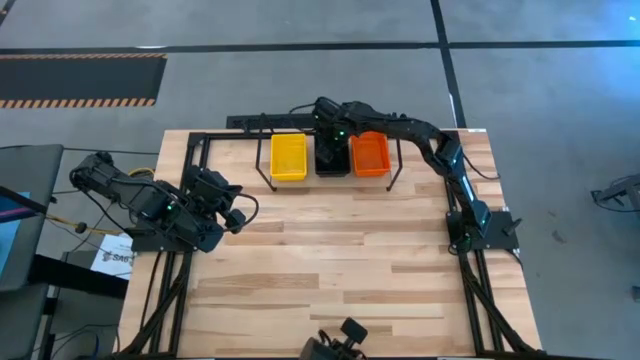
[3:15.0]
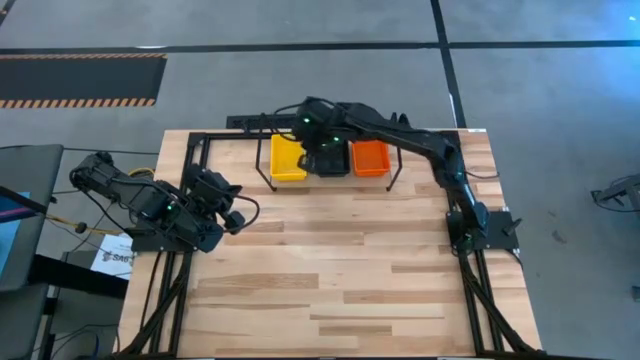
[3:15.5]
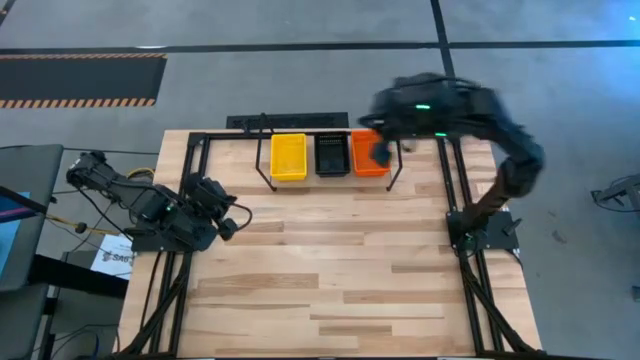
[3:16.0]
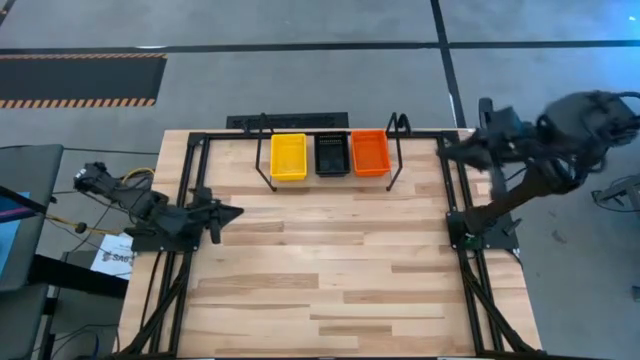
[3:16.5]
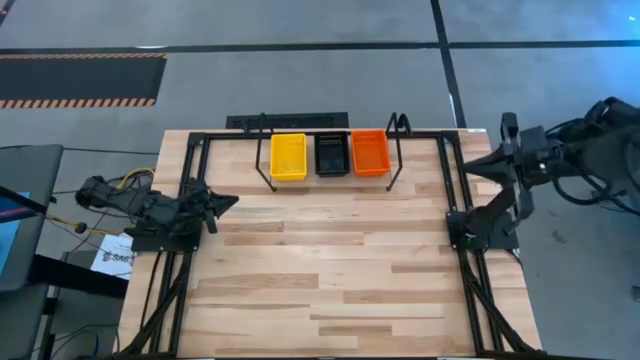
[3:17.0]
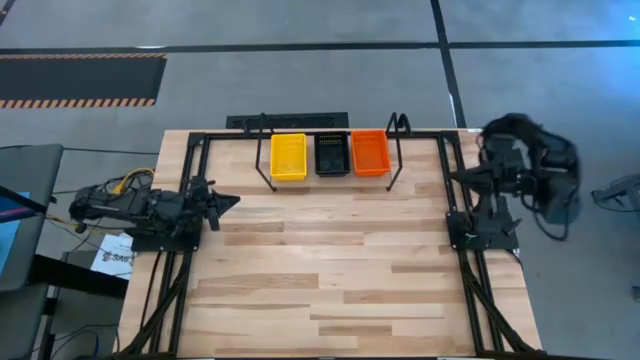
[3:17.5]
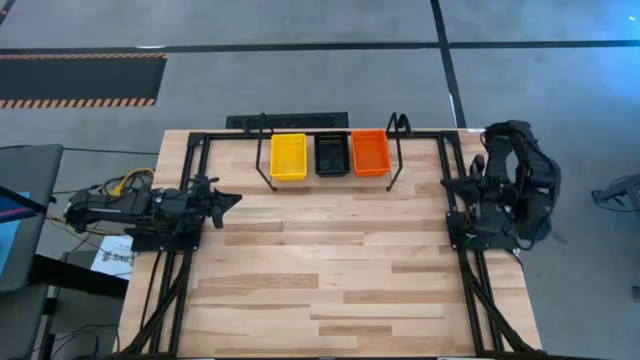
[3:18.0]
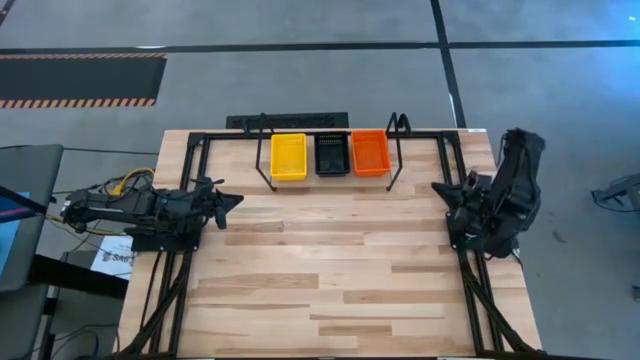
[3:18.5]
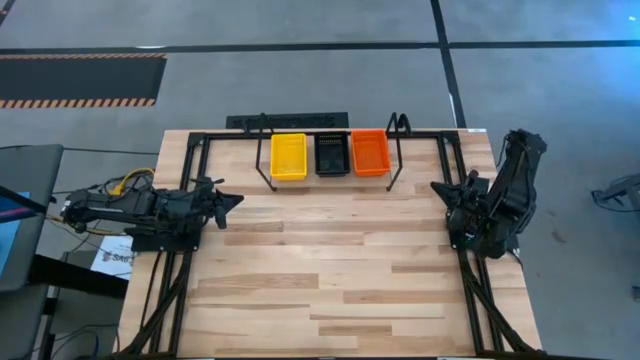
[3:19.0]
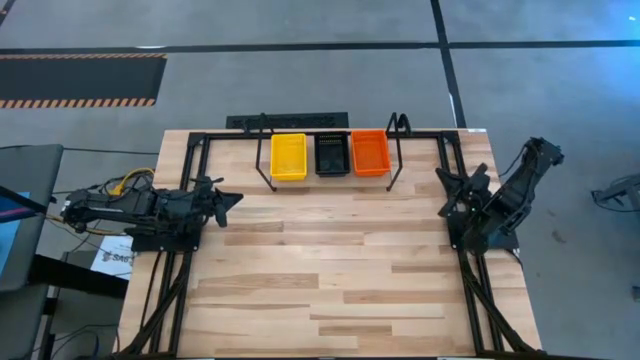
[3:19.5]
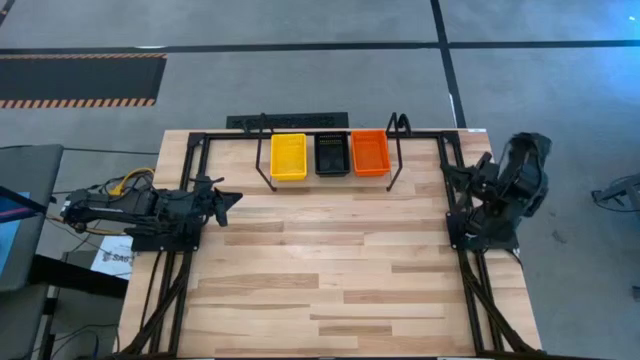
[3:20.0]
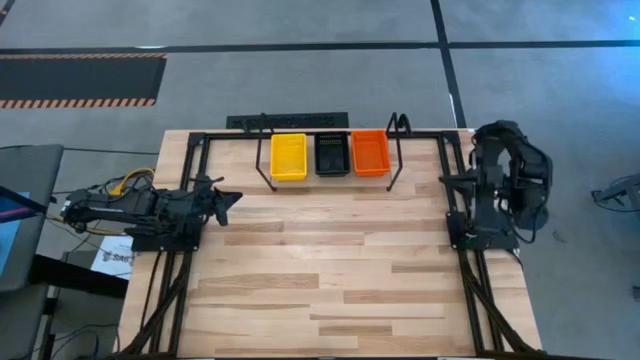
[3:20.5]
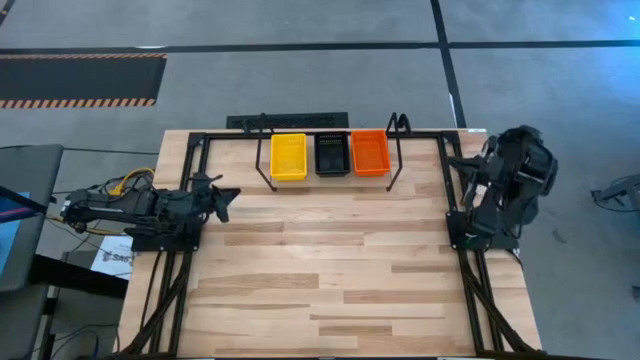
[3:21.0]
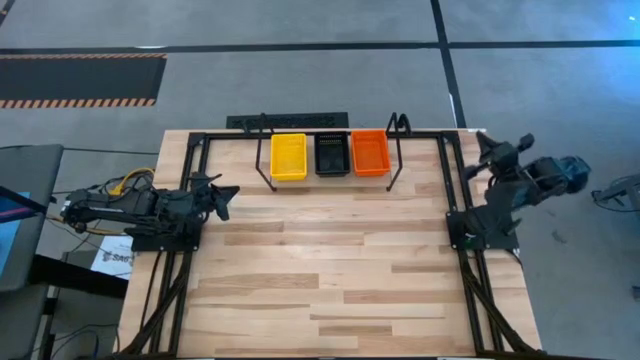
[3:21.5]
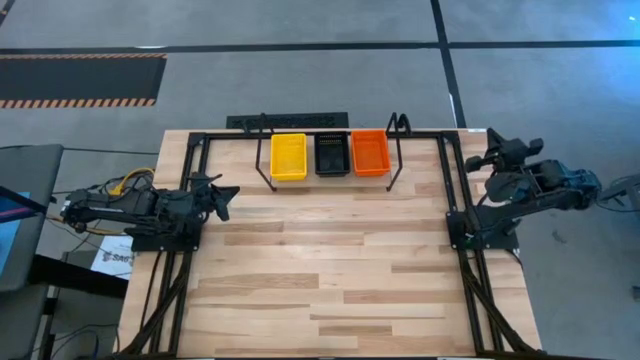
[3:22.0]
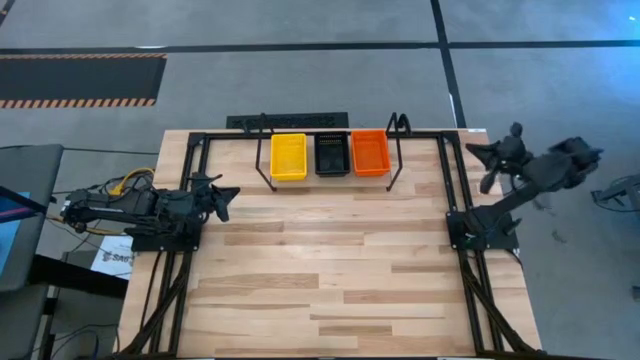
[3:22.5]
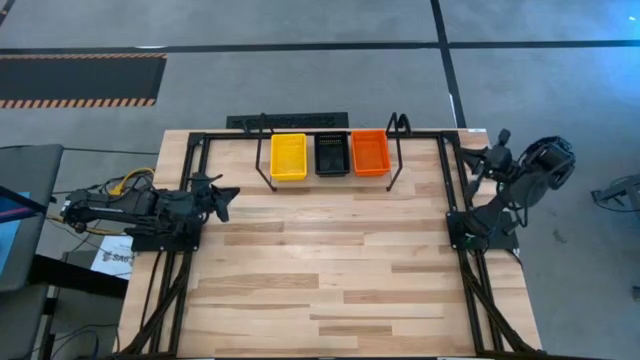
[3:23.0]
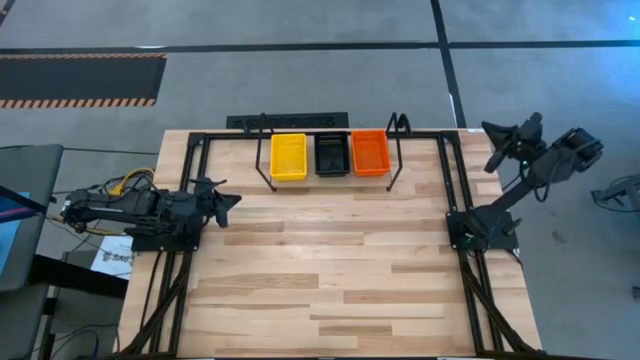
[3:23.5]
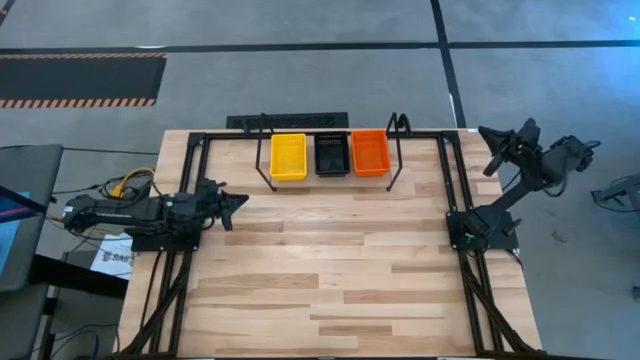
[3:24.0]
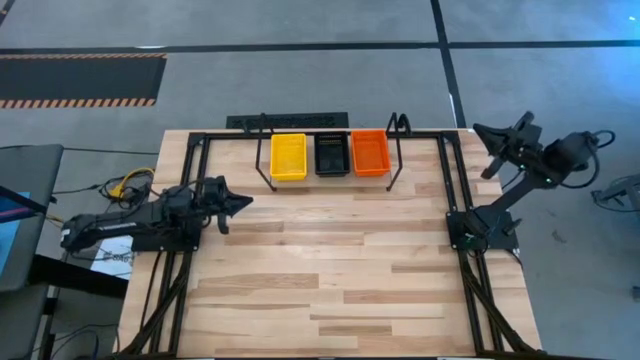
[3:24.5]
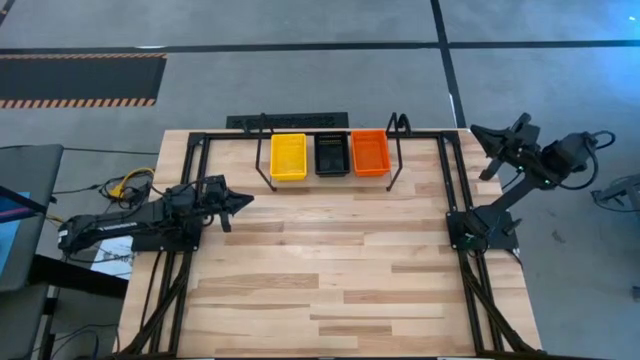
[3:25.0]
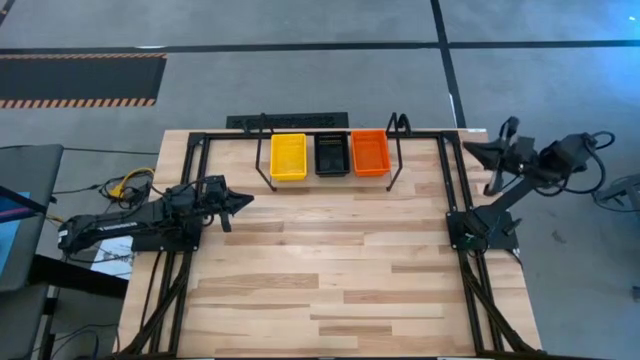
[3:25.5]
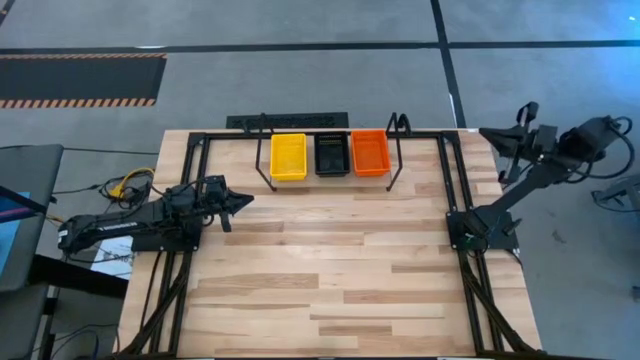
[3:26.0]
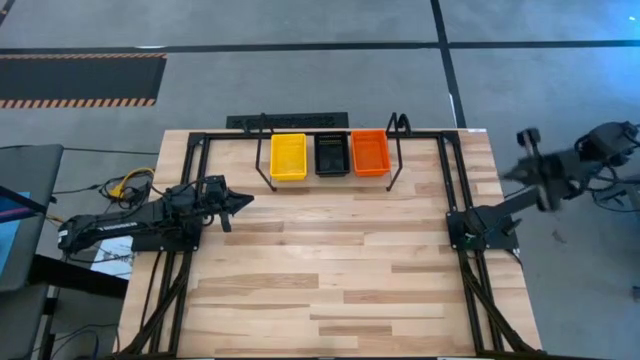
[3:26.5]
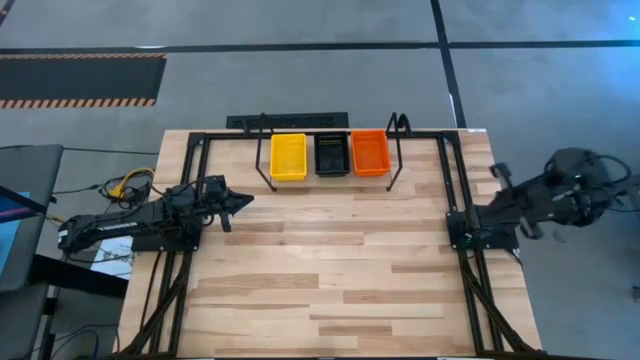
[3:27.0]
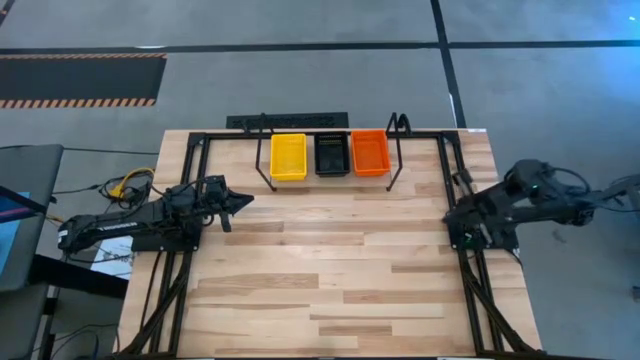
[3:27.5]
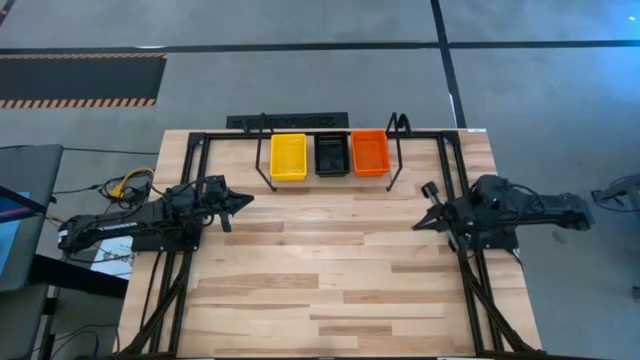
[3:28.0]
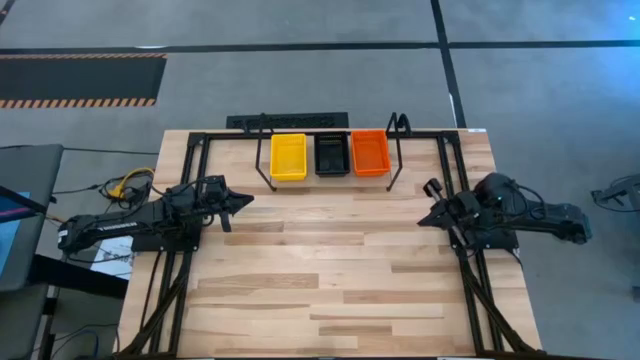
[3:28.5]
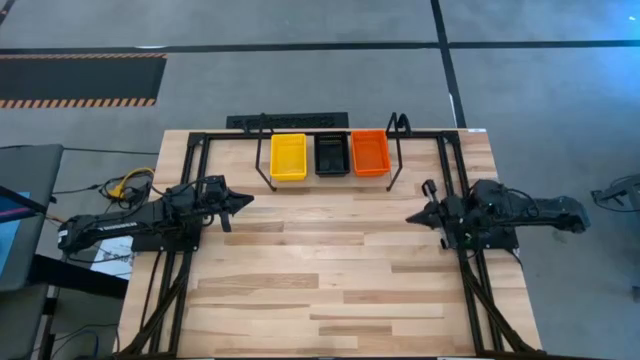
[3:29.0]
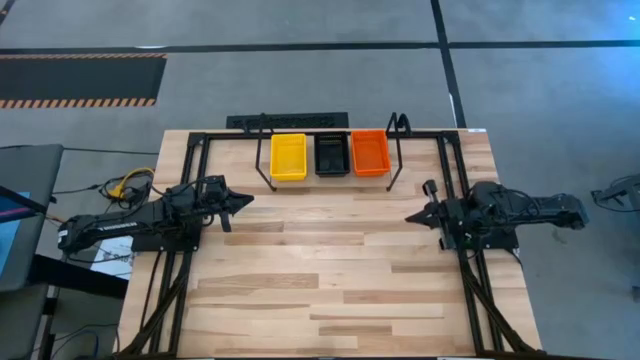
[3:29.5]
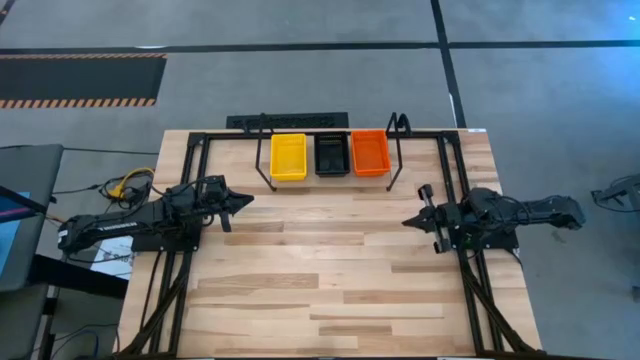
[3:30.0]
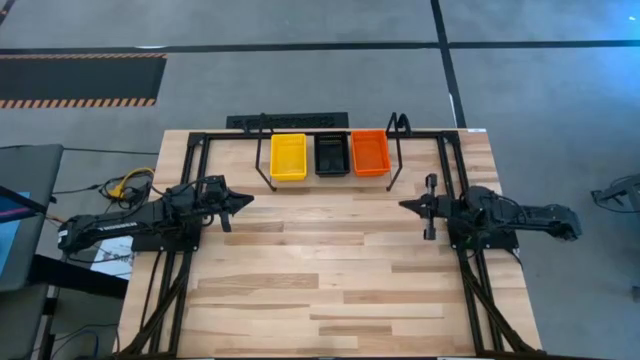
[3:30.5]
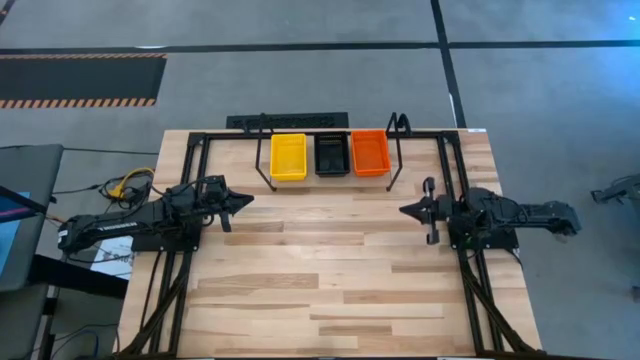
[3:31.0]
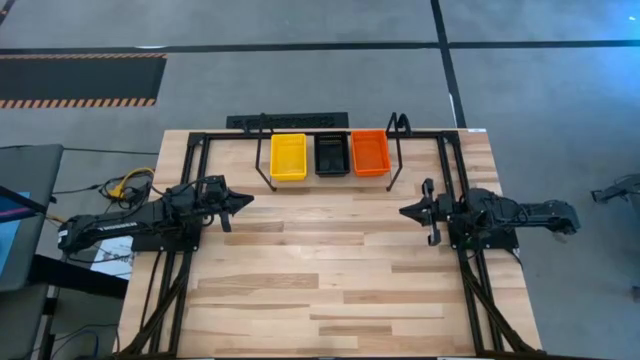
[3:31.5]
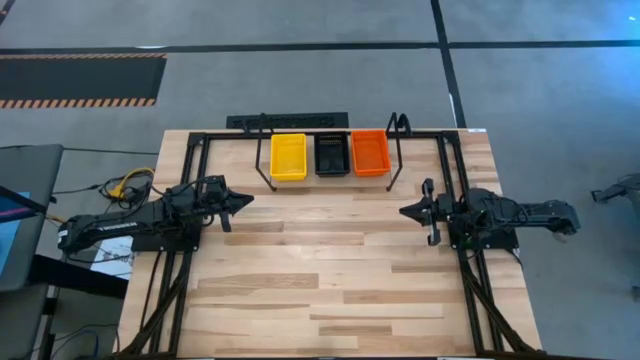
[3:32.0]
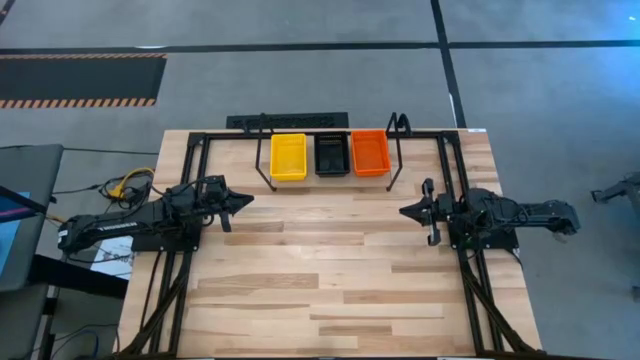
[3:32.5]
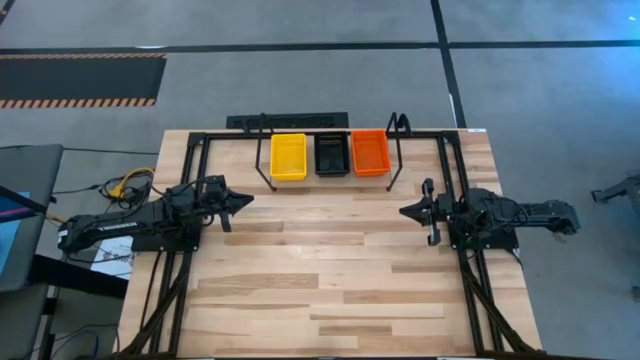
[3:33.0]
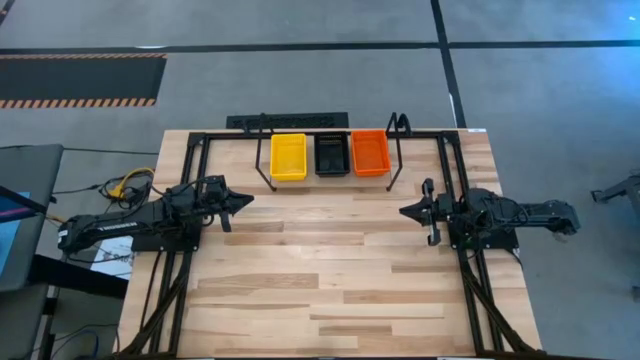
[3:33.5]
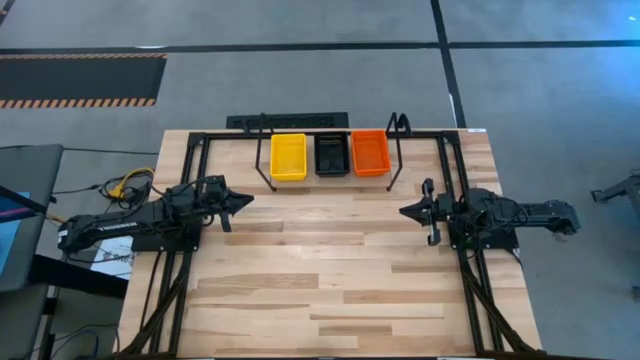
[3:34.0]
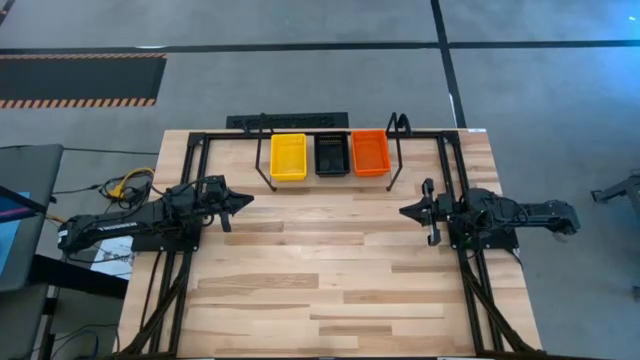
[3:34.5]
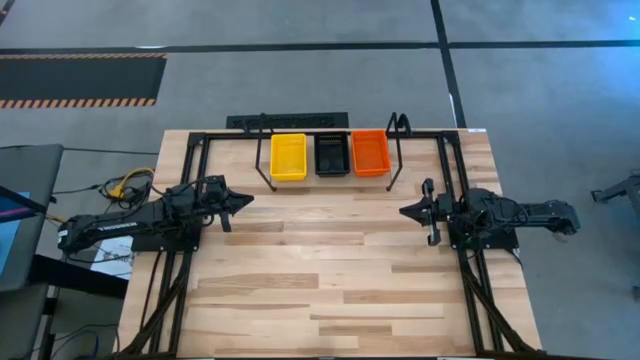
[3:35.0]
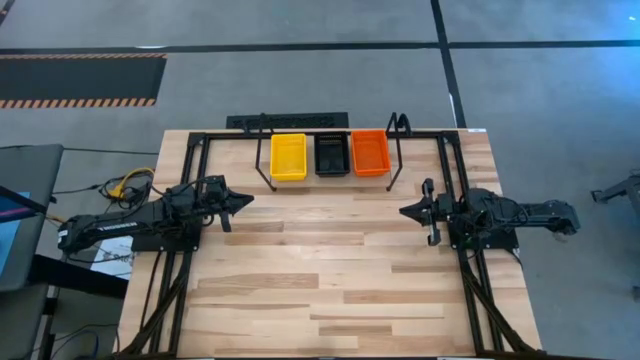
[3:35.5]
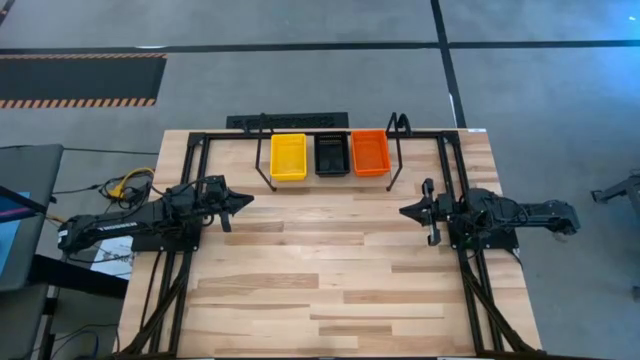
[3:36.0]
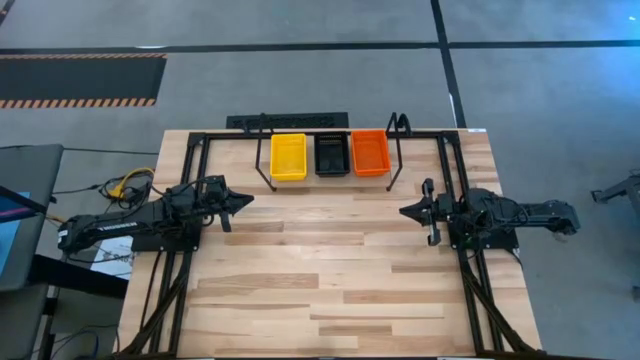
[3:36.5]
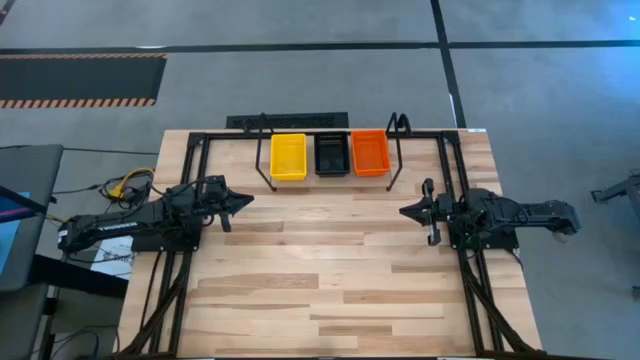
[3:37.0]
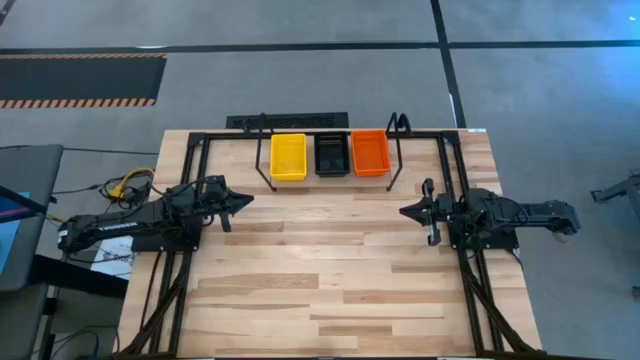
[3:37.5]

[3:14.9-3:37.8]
Task: Stack baskets on shelf by color
Return to Home Position
